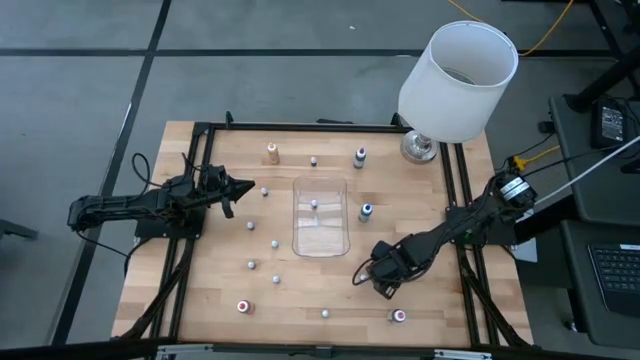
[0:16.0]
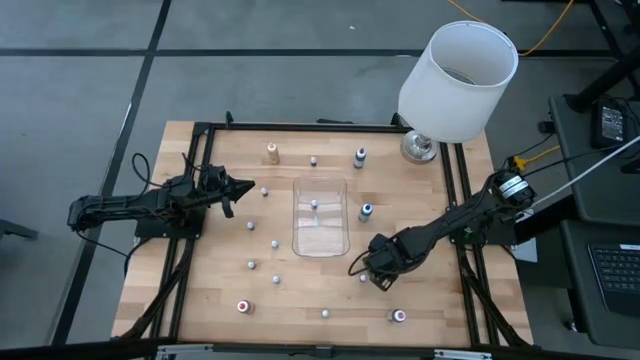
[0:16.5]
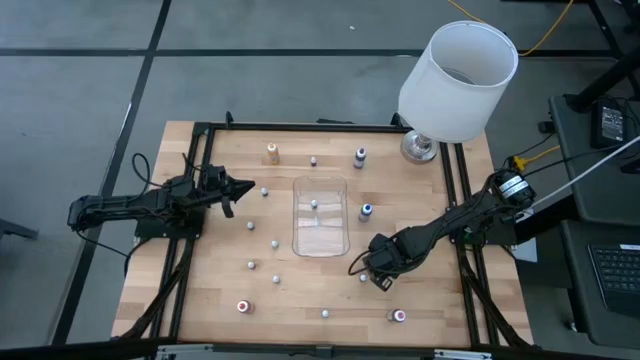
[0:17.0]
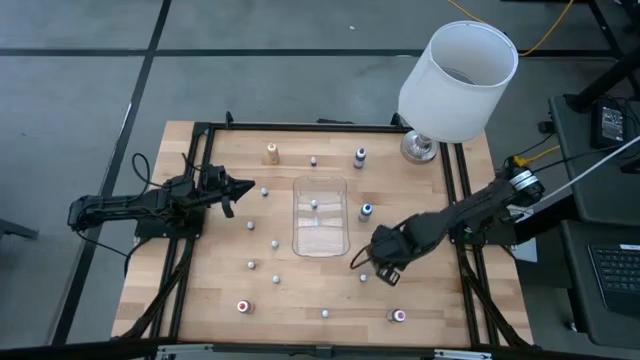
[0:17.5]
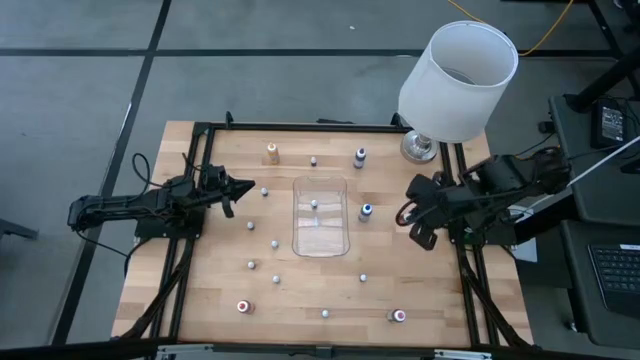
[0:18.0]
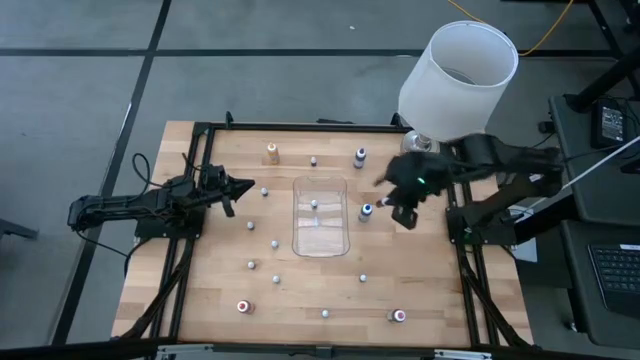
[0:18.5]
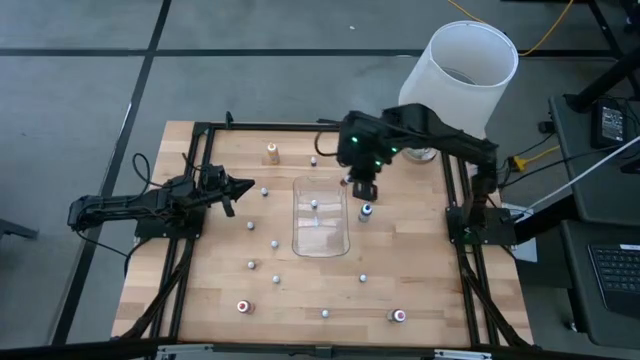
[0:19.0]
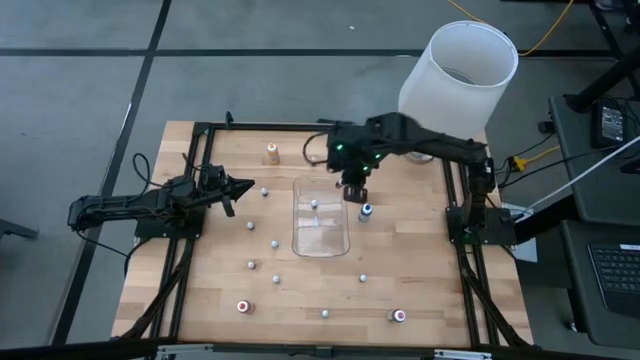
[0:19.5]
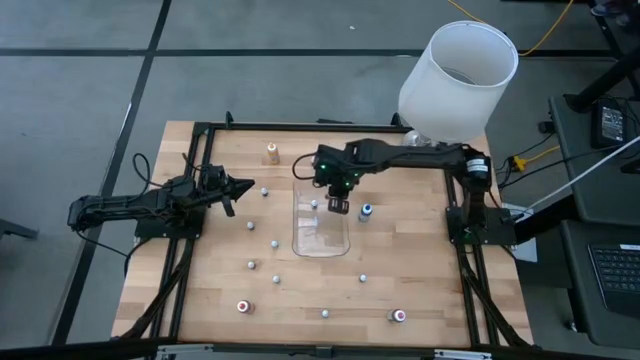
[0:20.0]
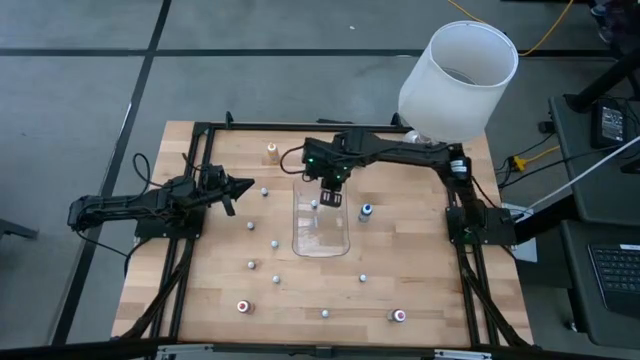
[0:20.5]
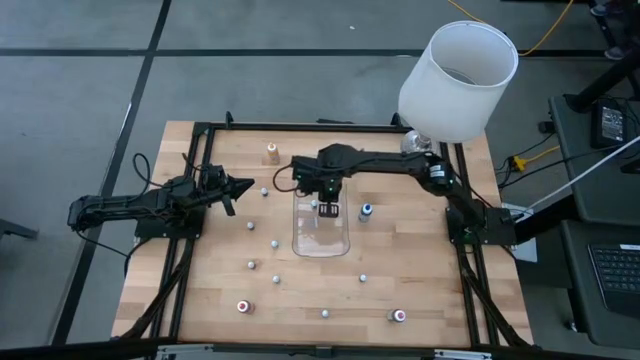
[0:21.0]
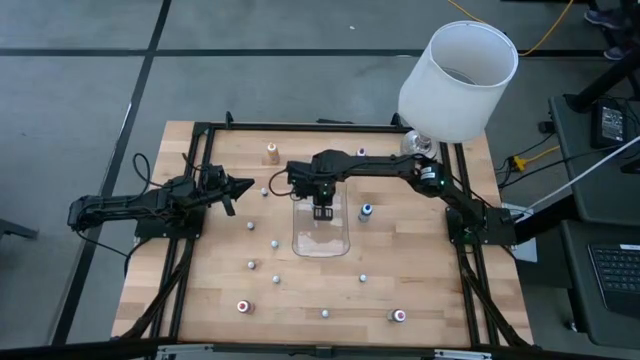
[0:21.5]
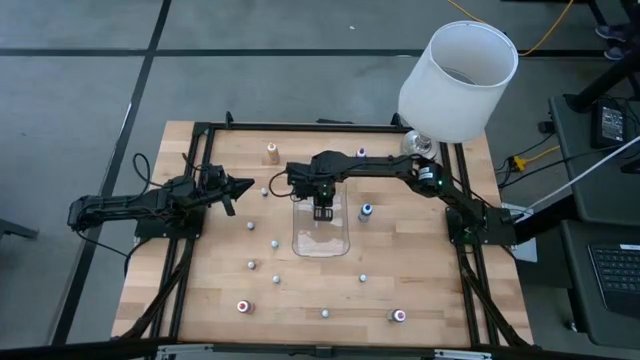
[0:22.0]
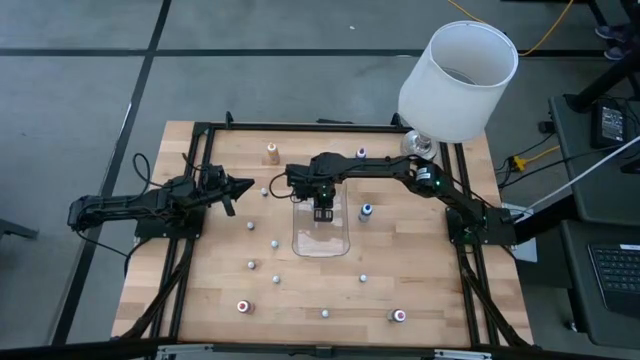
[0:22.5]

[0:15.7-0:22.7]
Task: Pick & Place food coloring
Put the small red coloring into the transparent bin

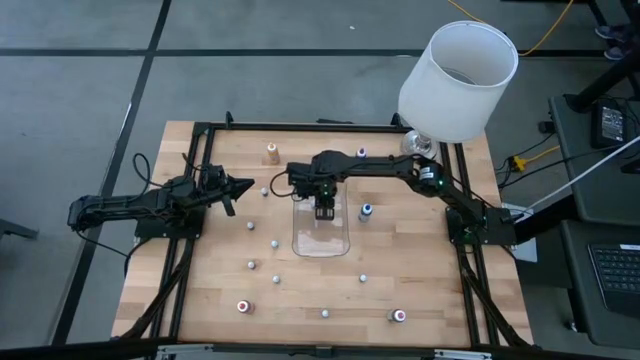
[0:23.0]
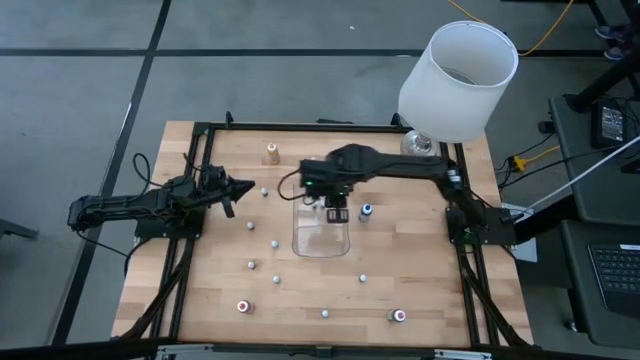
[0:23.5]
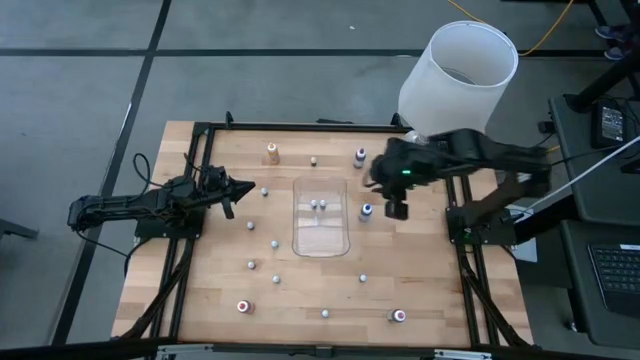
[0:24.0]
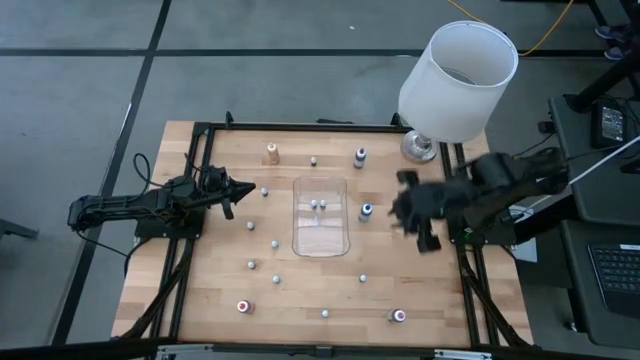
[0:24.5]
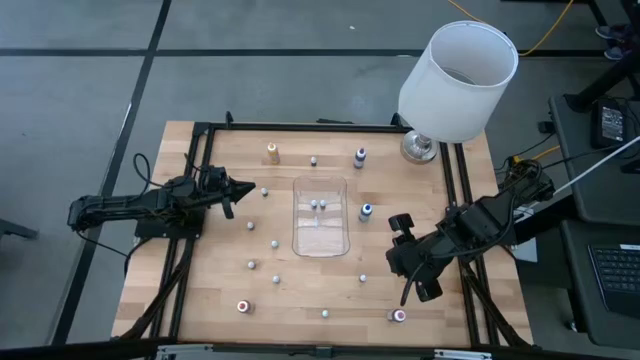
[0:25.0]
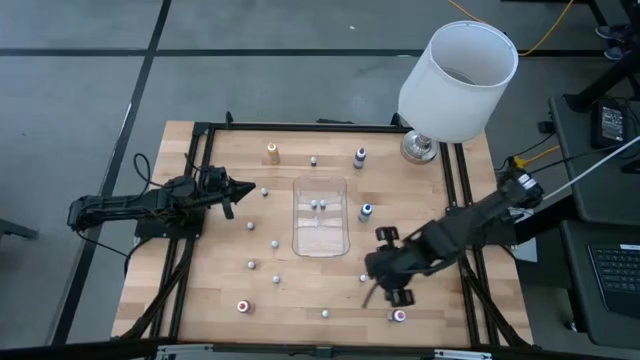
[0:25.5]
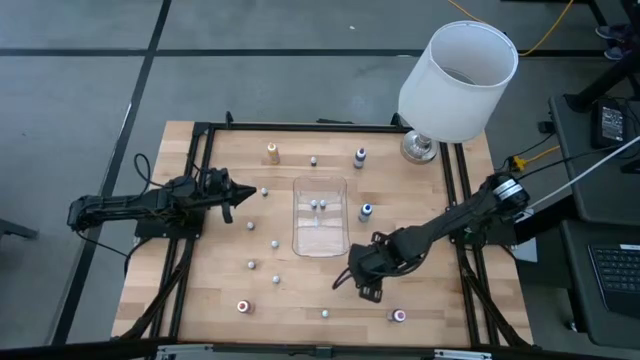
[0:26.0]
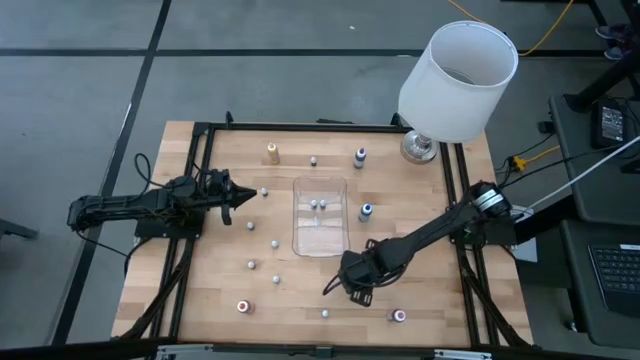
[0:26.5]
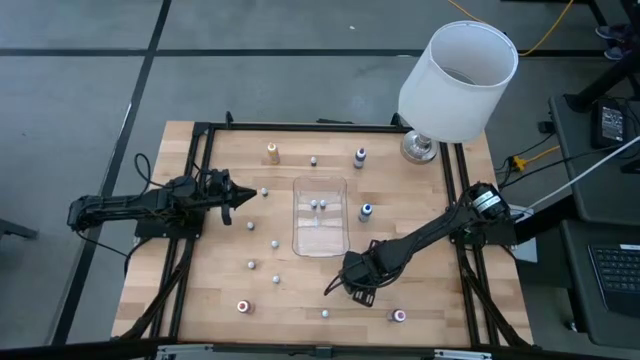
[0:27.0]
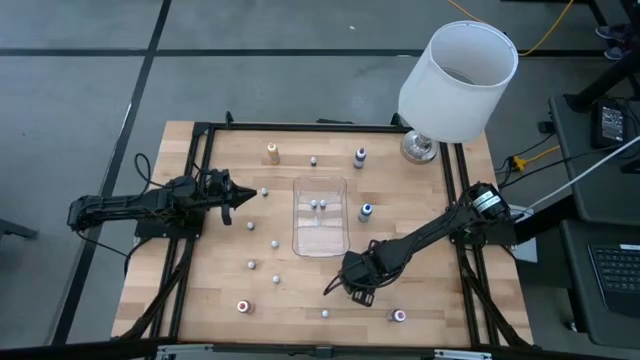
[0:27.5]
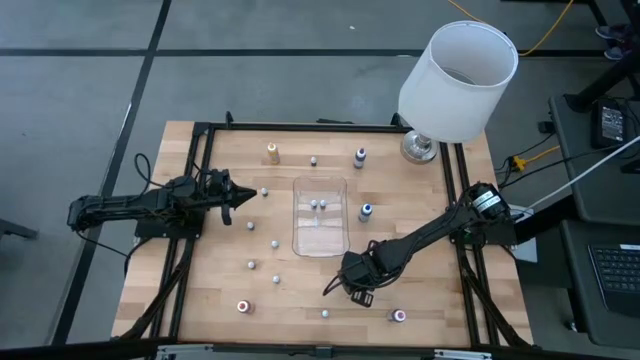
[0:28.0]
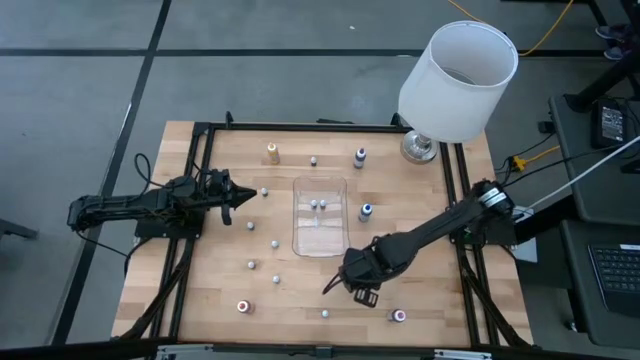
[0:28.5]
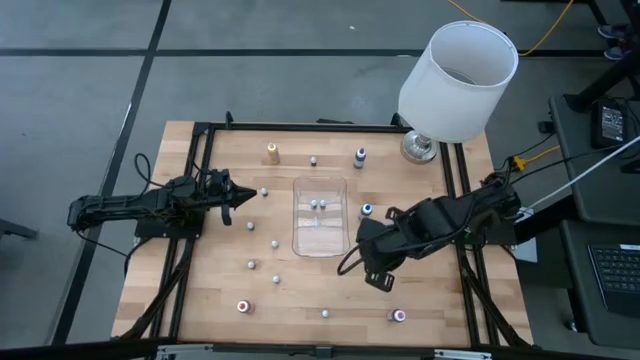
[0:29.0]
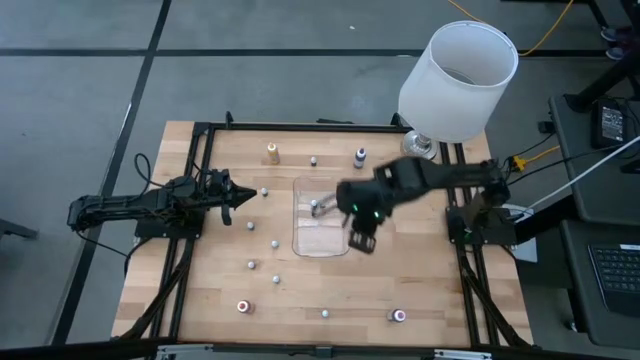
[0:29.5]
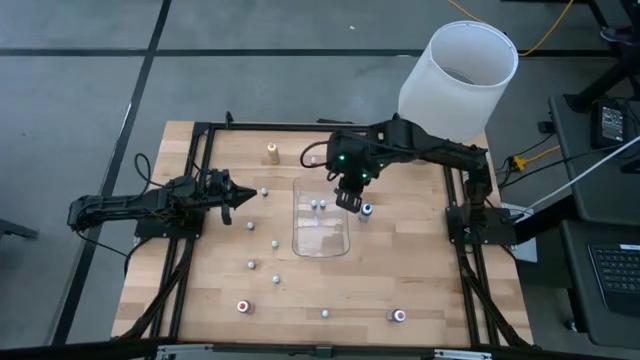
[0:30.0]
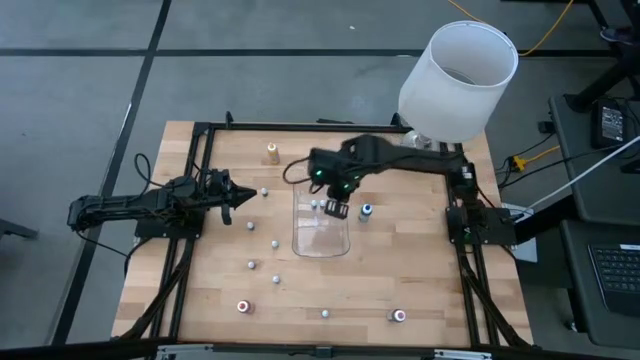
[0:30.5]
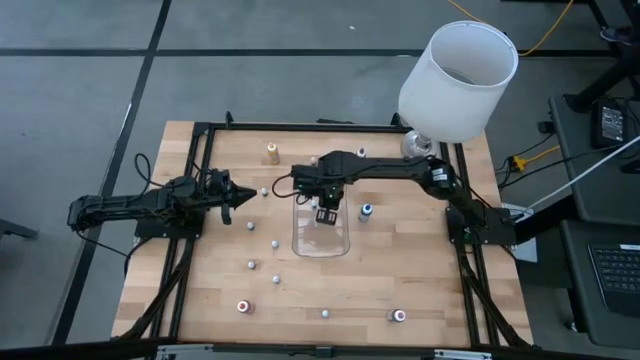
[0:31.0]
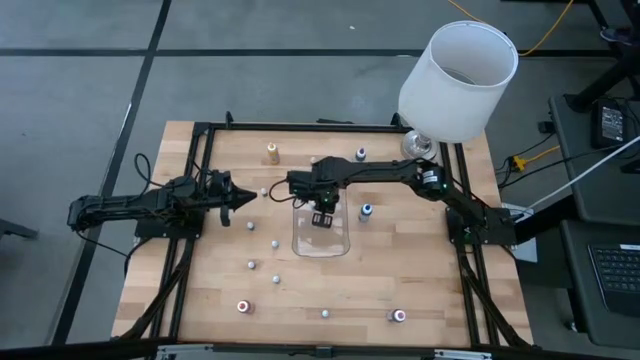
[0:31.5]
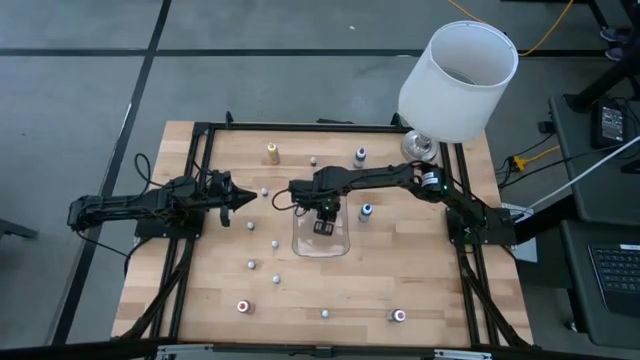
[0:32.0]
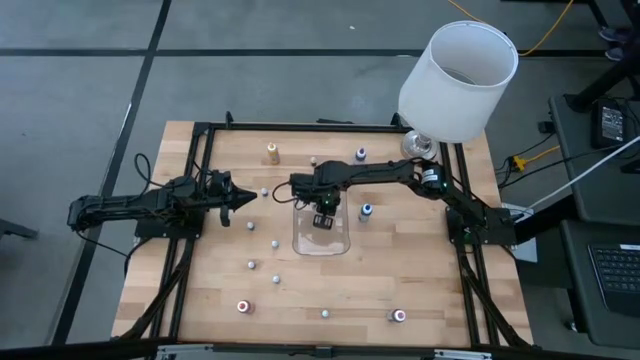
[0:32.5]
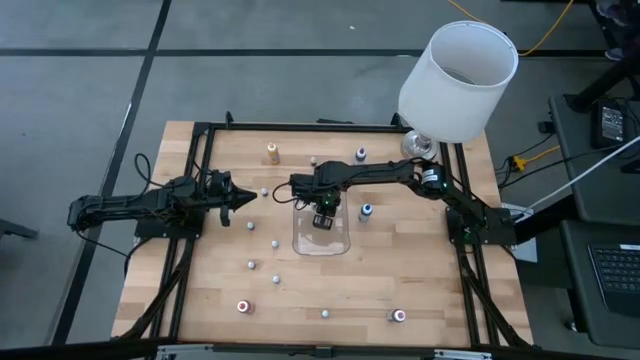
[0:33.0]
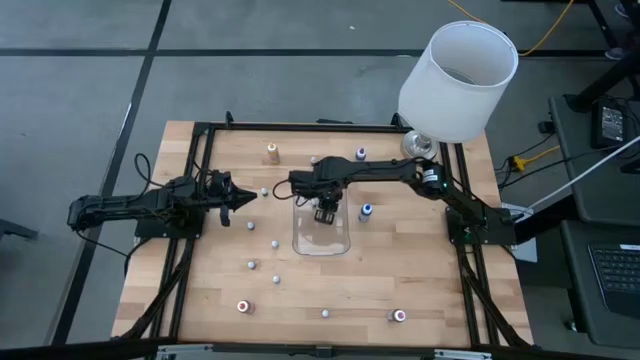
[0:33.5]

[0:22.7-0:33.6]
Put the small blue food coloring into the transparent bin

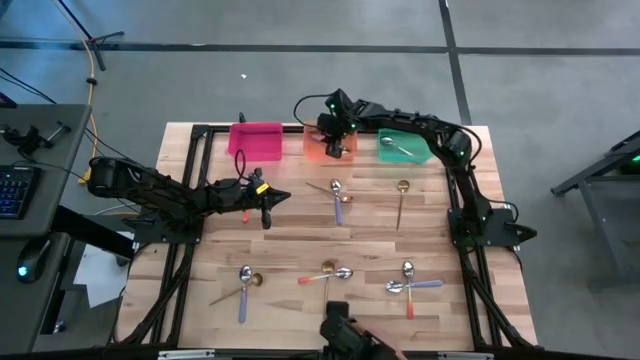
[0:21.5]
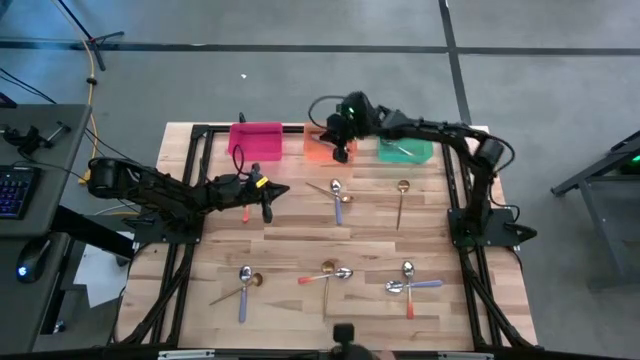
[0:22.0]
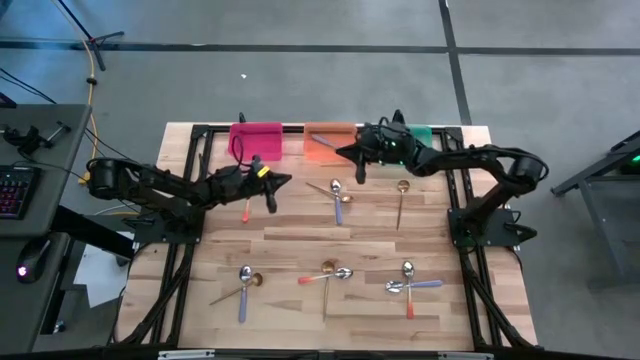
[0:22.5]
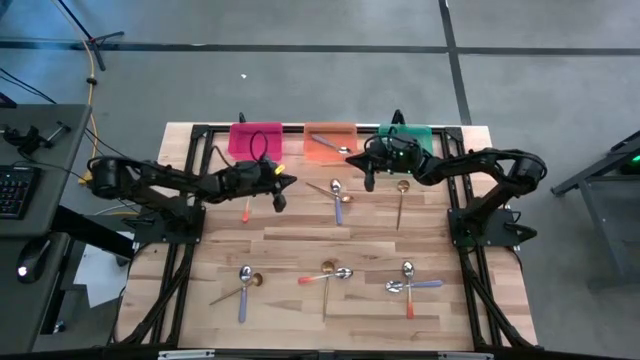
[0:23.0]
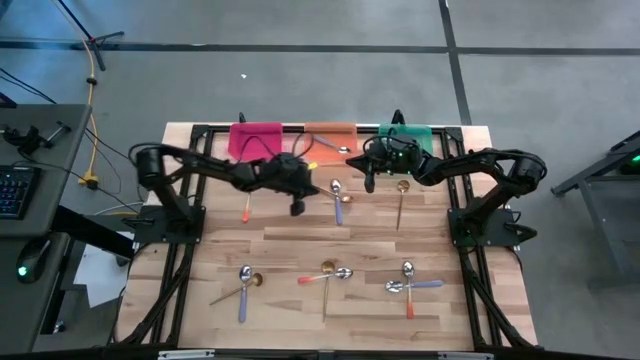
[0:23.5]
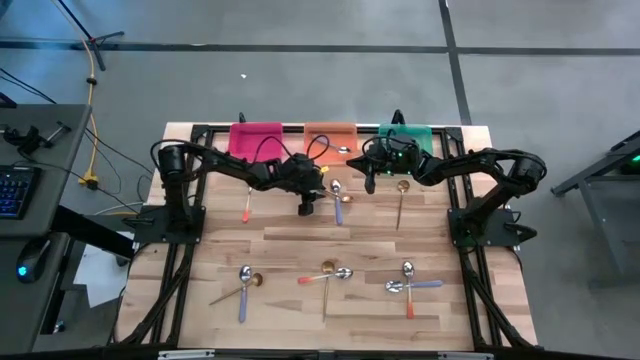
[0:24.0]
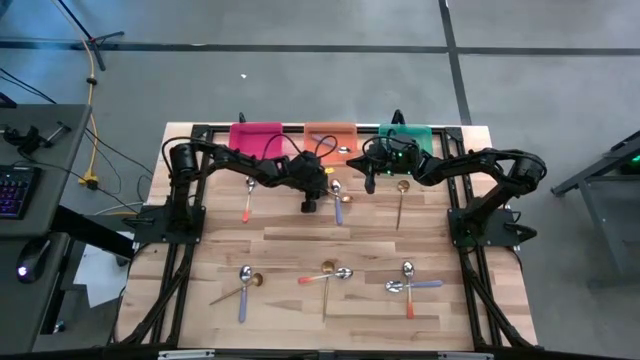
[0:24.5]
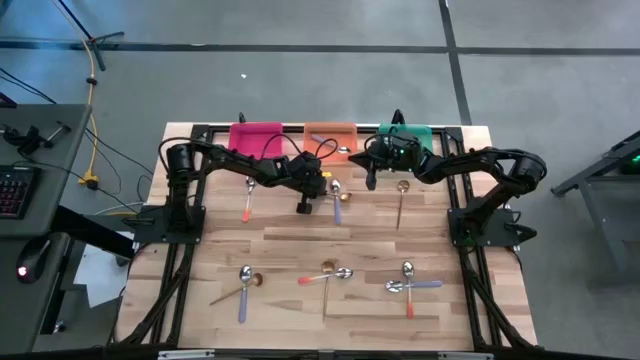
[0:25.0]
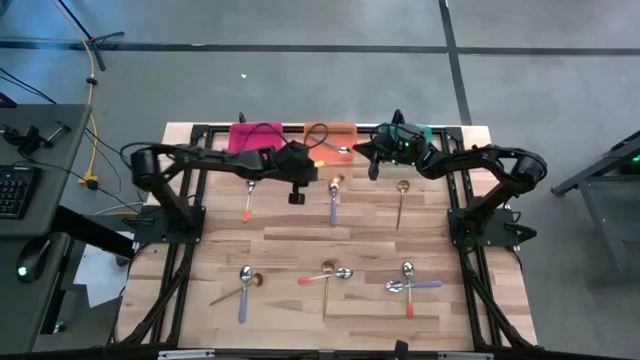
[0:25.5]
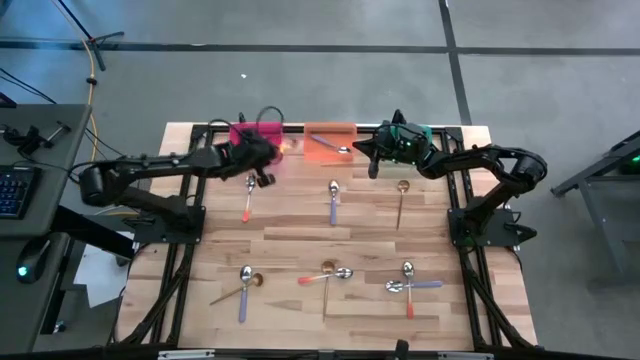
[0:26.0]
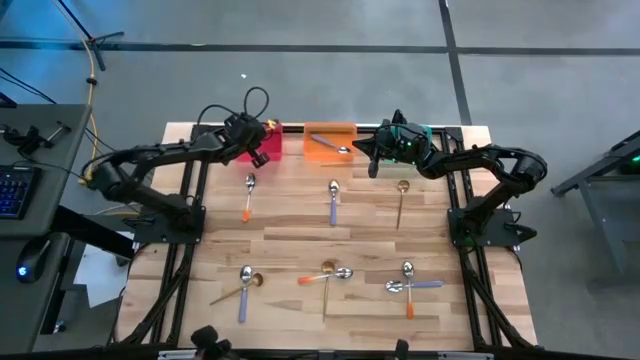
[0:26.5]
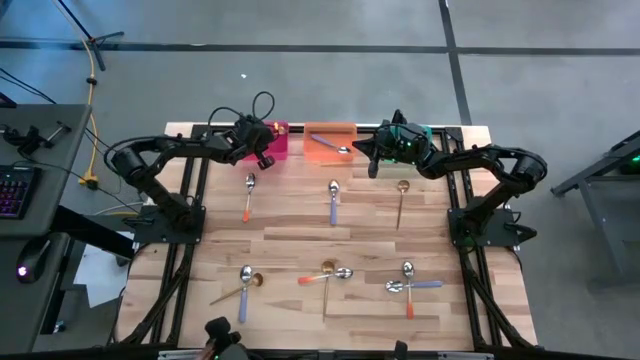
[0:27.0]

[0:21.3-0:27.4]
Task: Sort silverware by color (type)
Put the top left gold spoon into the pink bin
